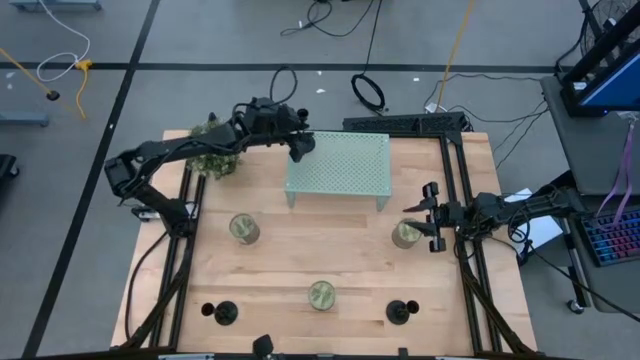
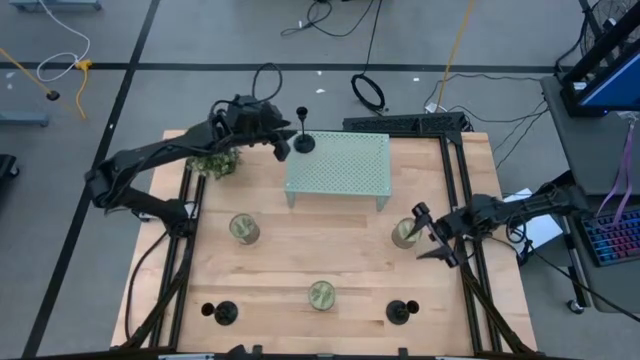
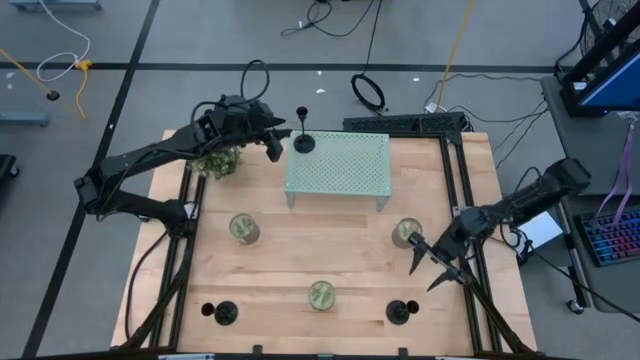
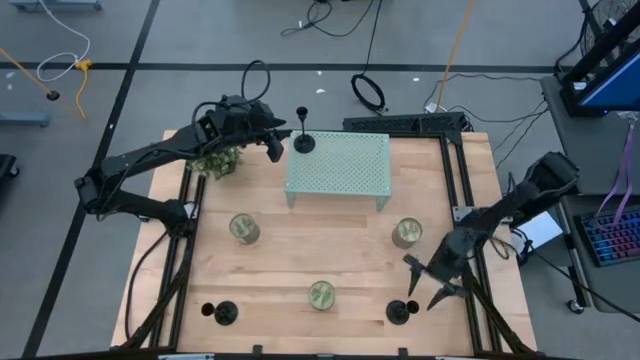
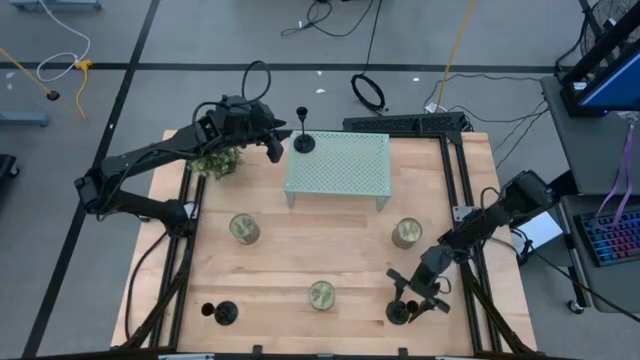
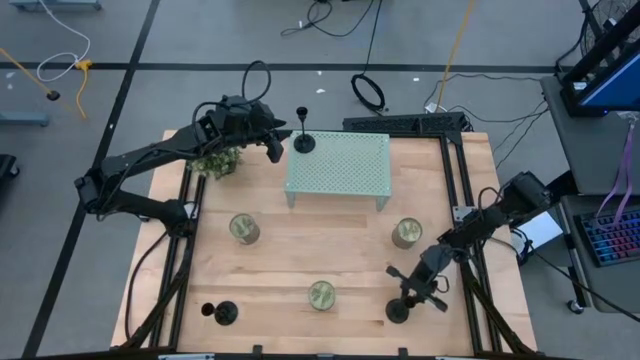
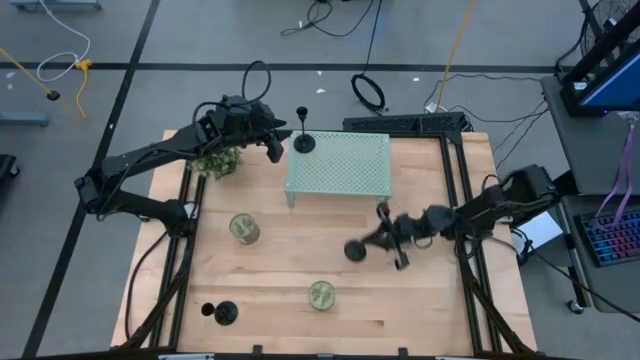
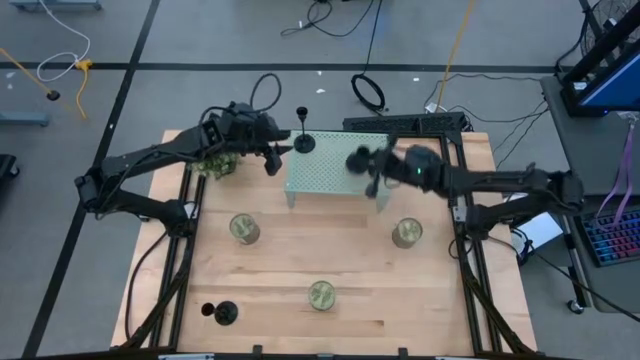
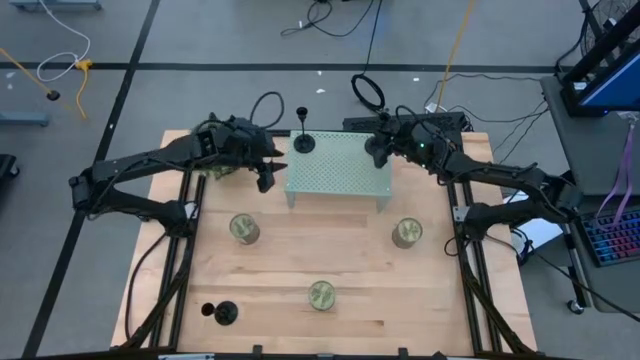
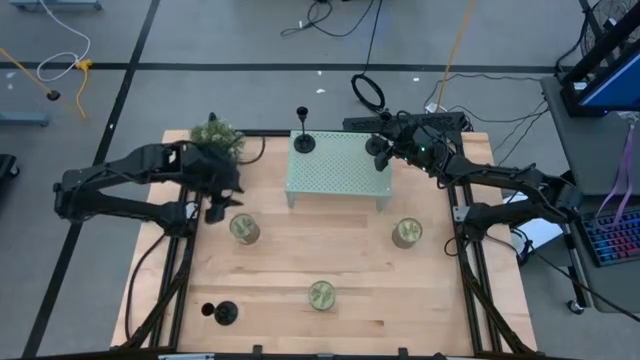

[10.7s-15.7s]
Task: Pick & Place candle stick holders
Put the right candle holder on the shelf

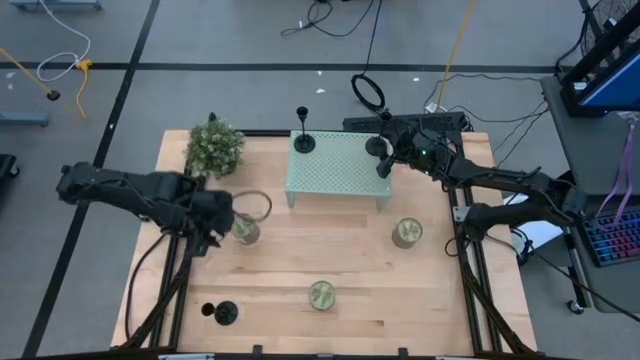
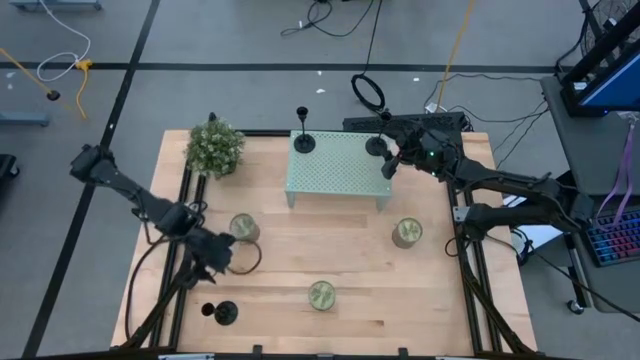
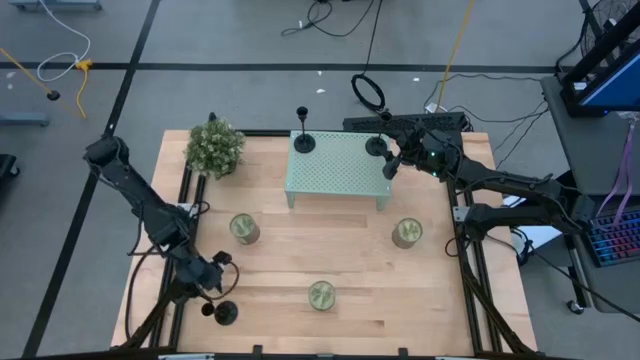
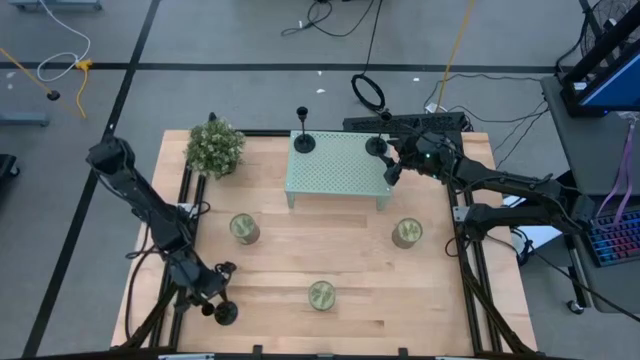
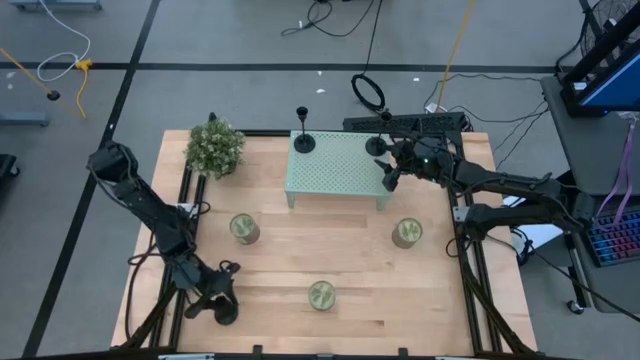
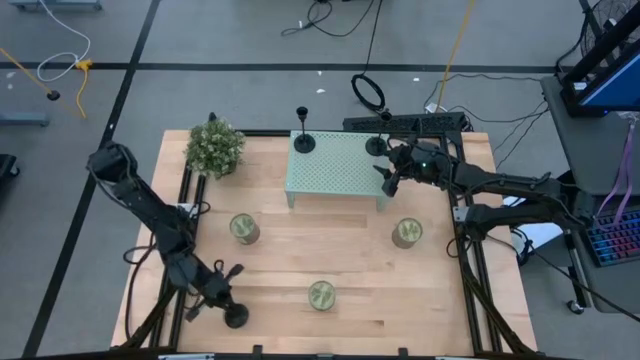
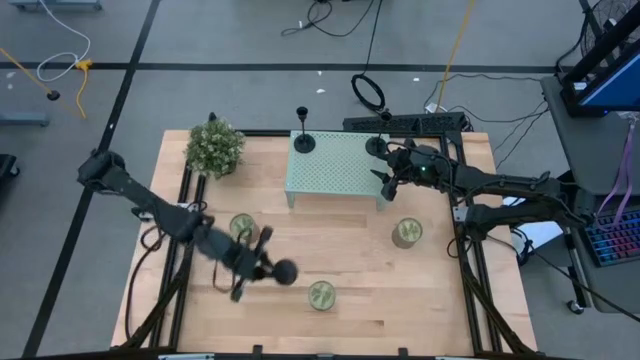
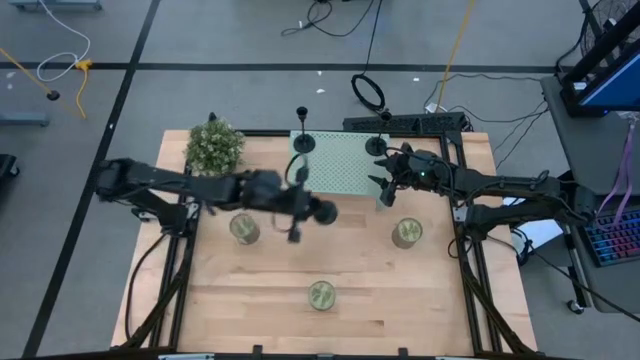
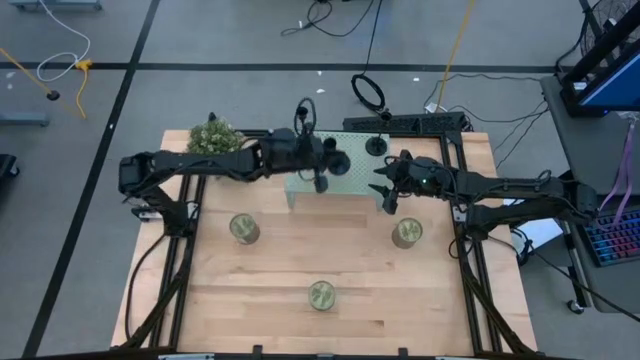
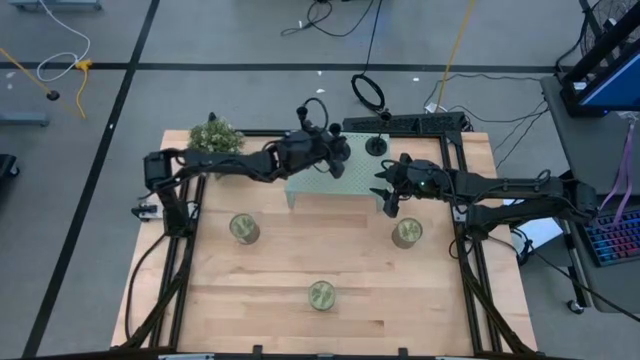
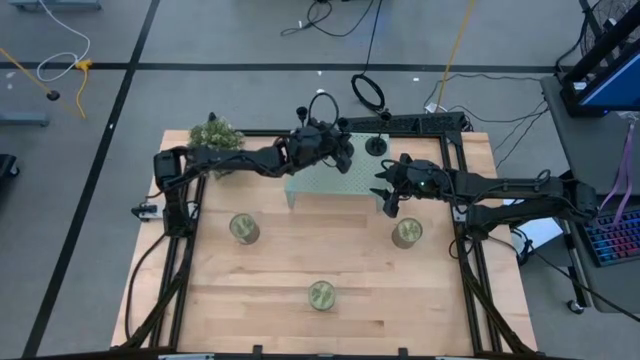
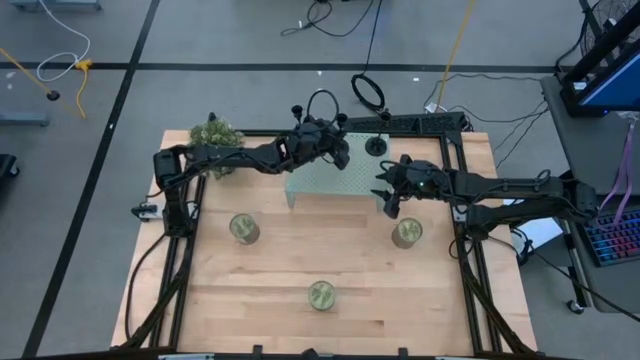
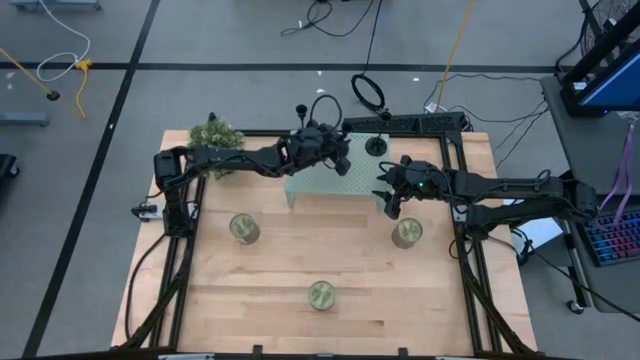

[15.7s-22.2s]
Put the candle holder on the shelf

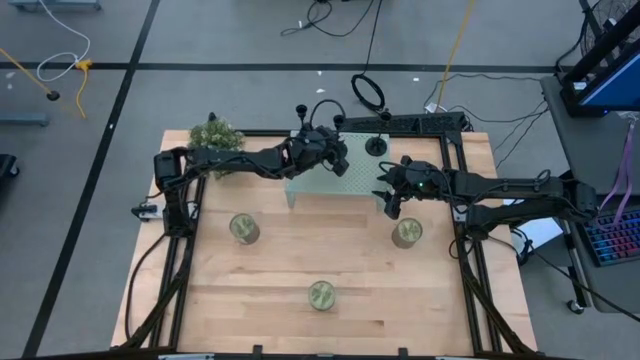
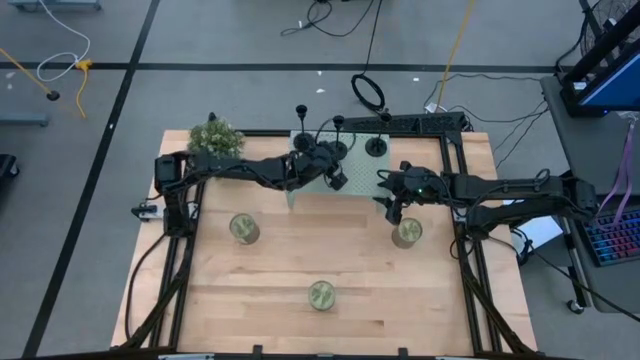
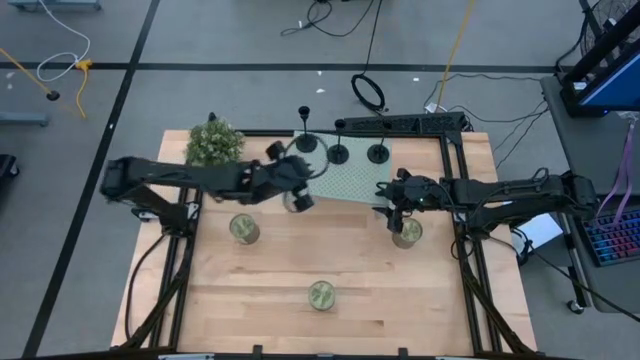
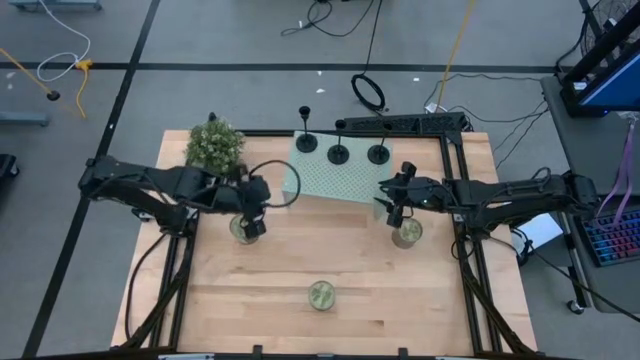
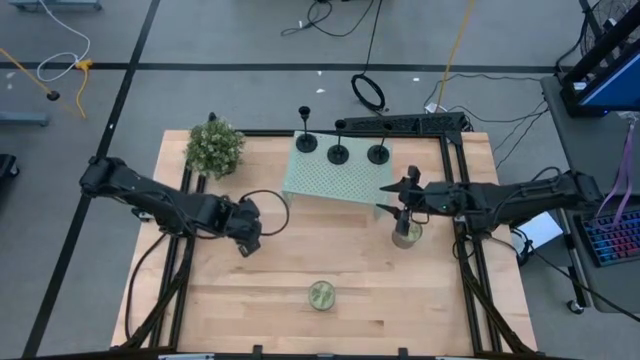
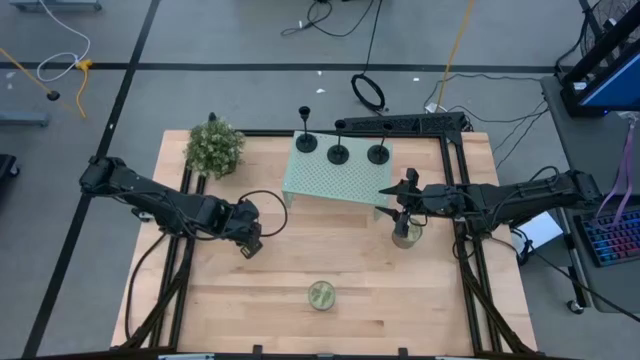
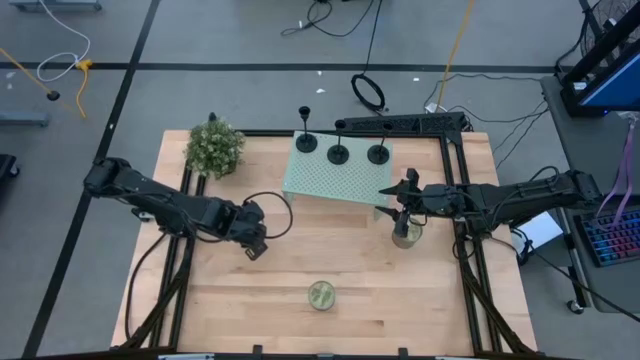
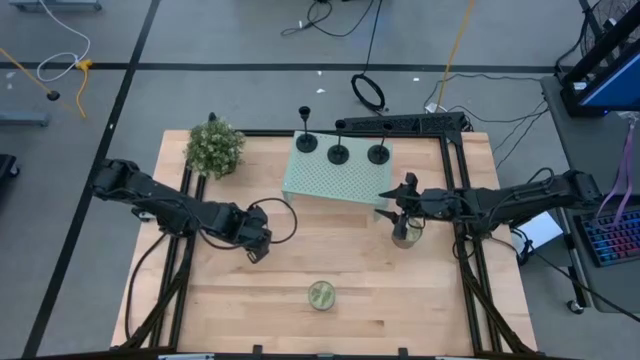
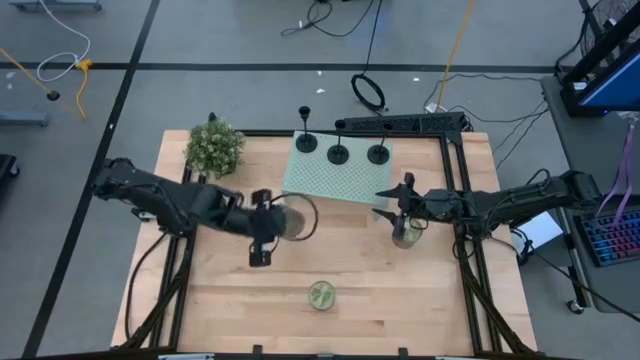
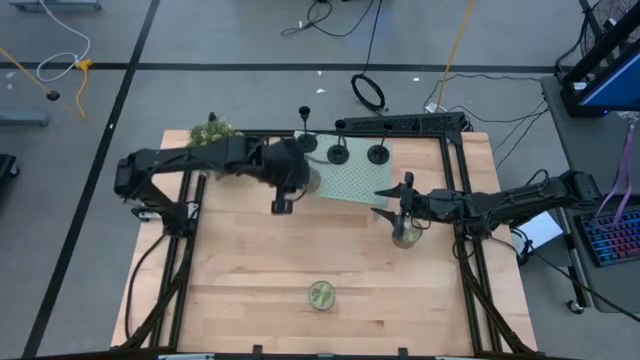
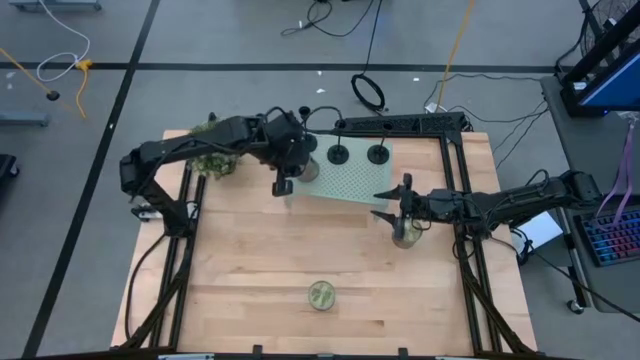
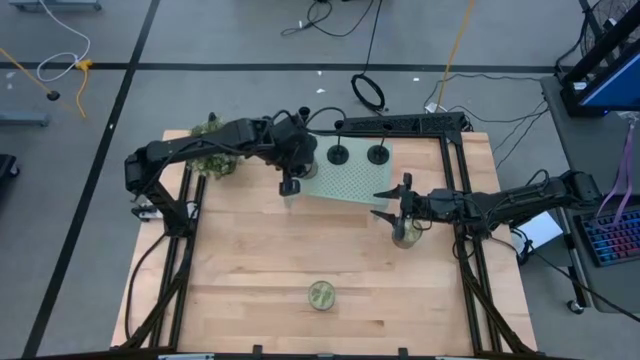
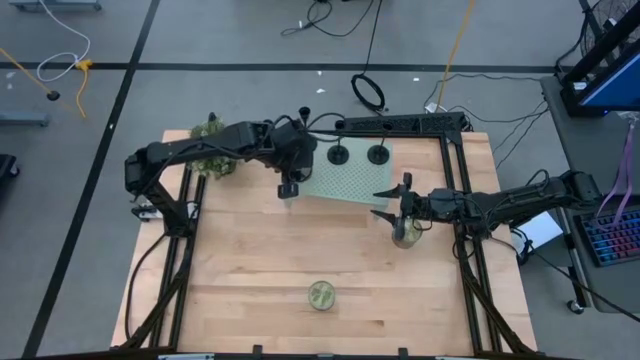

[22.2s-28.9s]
Put the left scented candle on the shelf

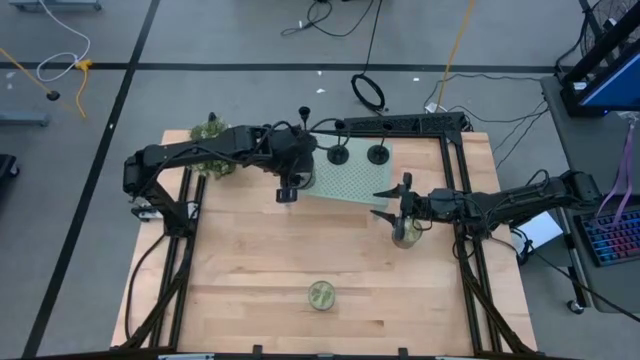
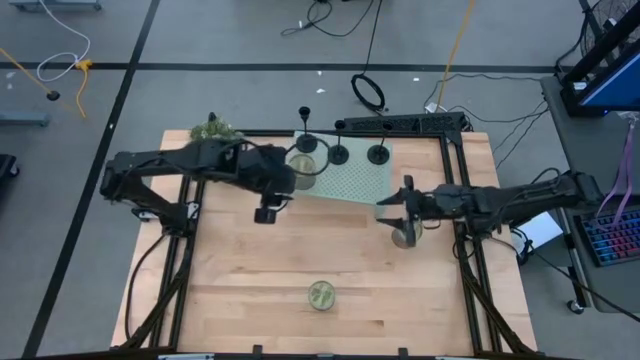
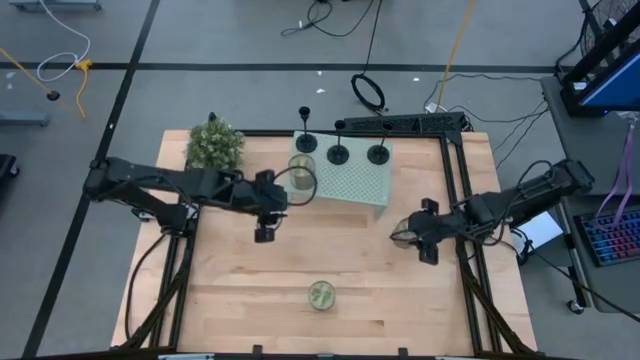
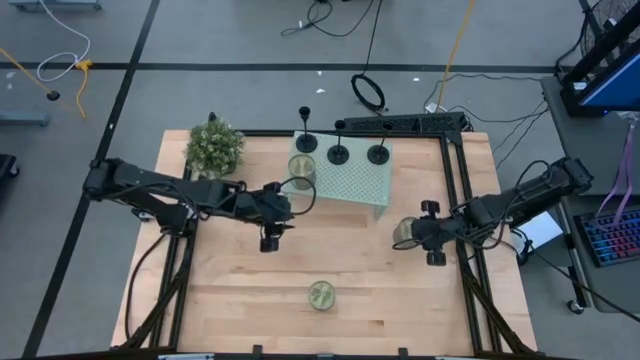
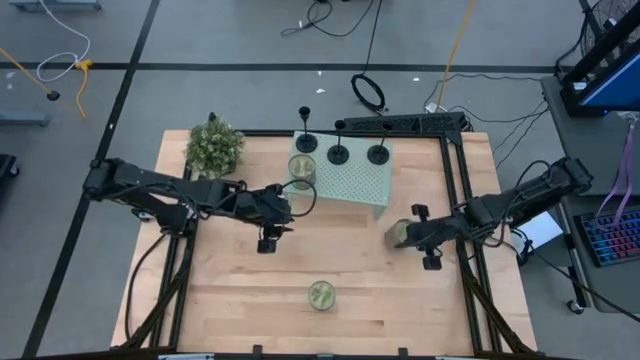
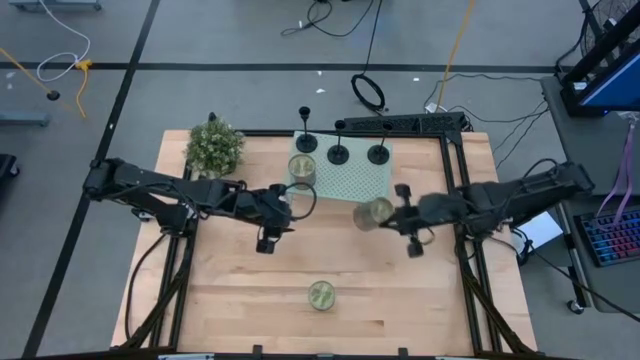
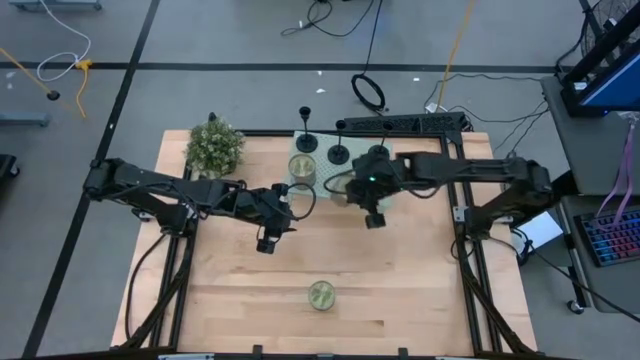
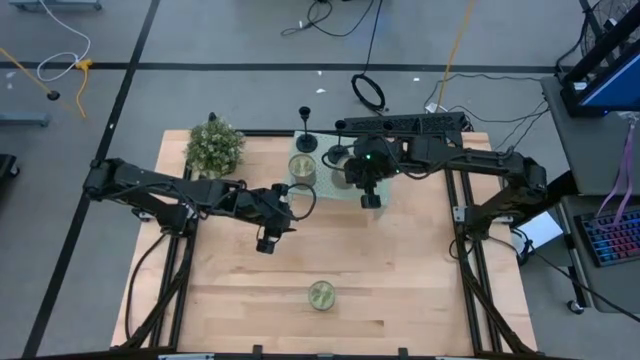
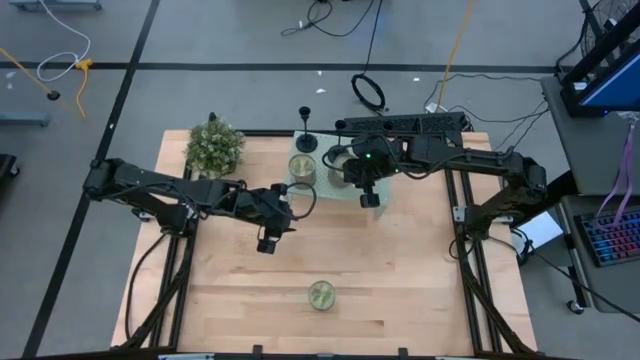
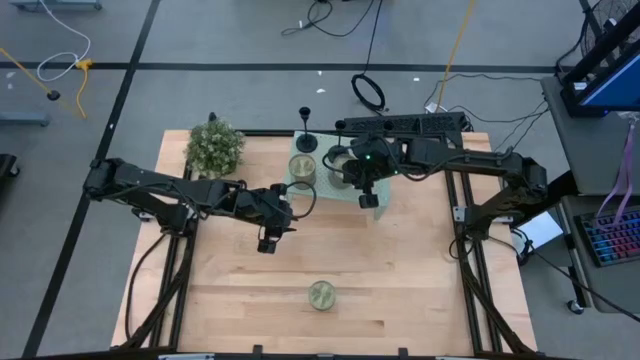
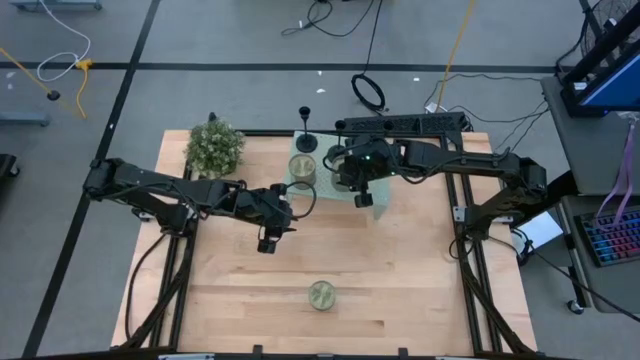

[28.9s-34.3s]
Put the right scented candle on the shelf
